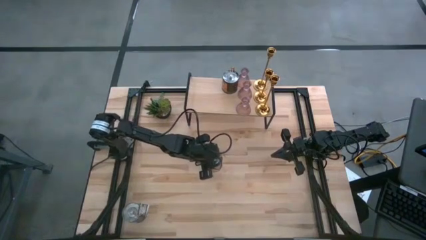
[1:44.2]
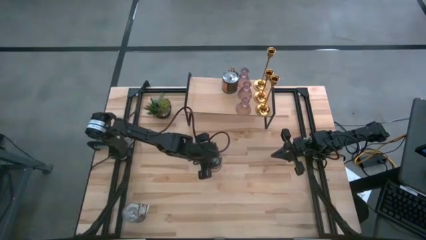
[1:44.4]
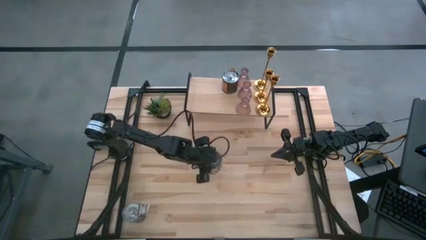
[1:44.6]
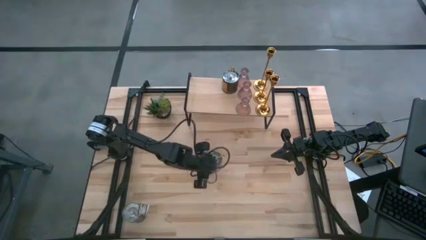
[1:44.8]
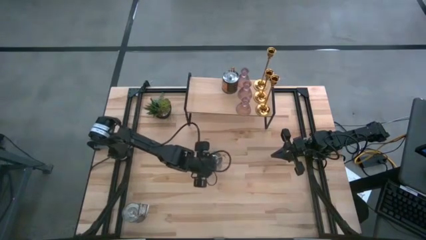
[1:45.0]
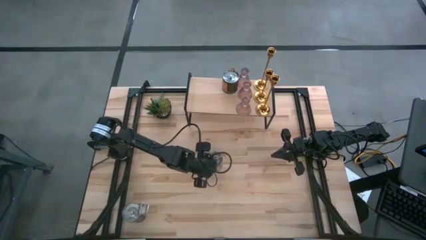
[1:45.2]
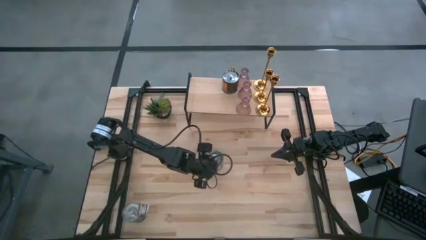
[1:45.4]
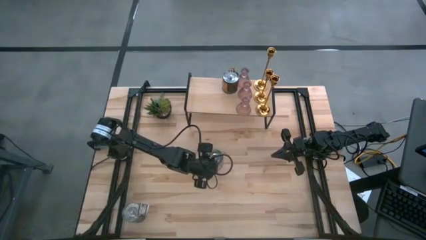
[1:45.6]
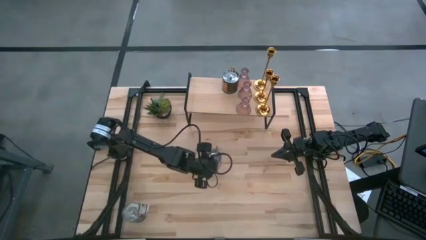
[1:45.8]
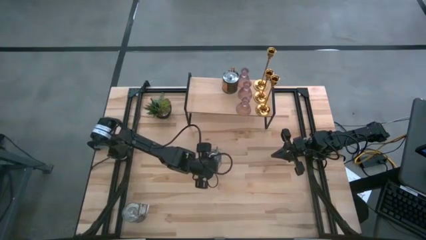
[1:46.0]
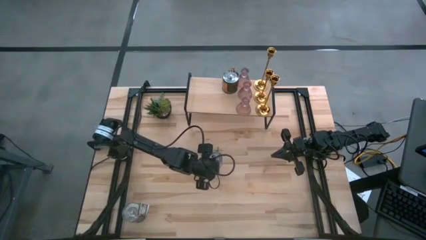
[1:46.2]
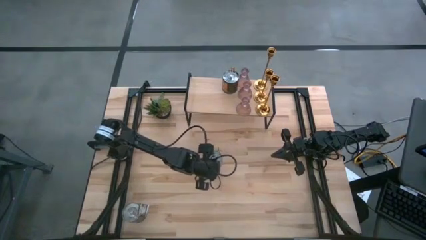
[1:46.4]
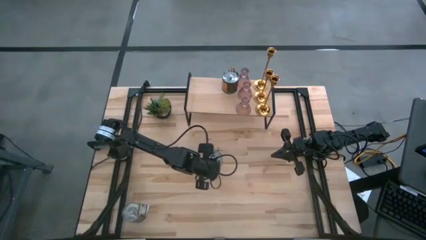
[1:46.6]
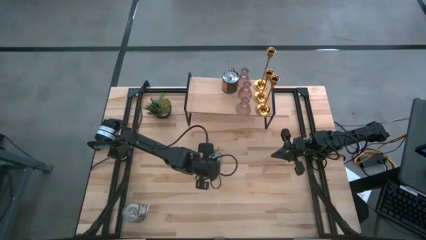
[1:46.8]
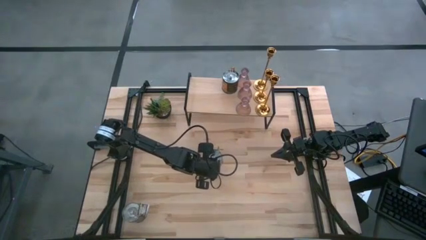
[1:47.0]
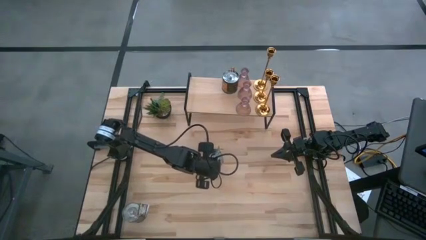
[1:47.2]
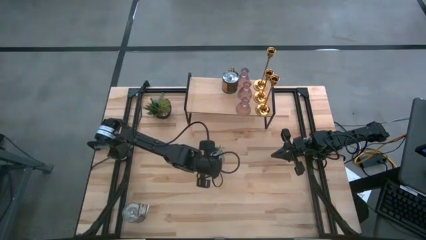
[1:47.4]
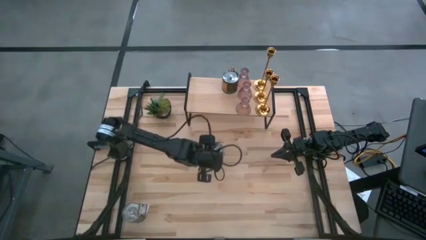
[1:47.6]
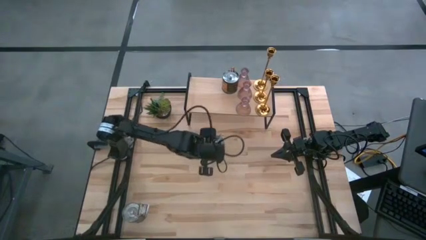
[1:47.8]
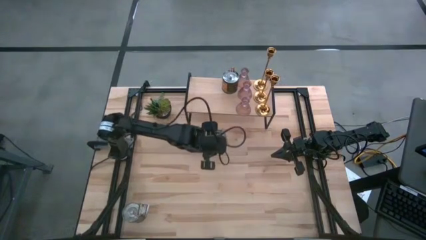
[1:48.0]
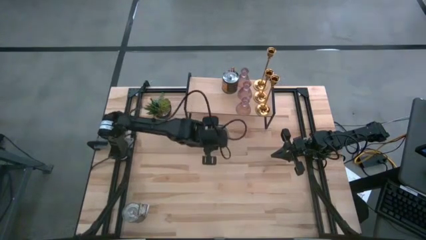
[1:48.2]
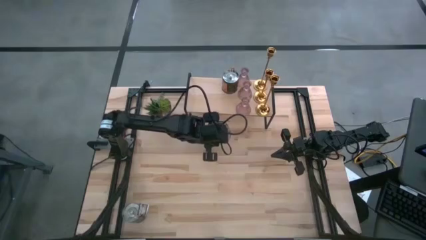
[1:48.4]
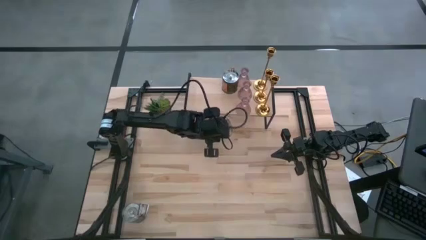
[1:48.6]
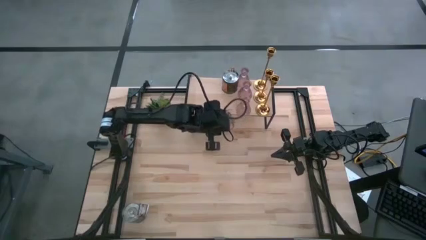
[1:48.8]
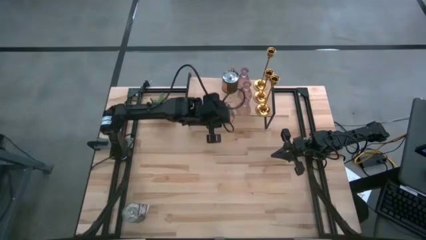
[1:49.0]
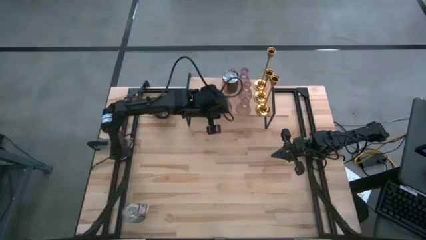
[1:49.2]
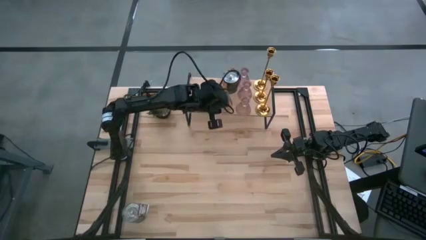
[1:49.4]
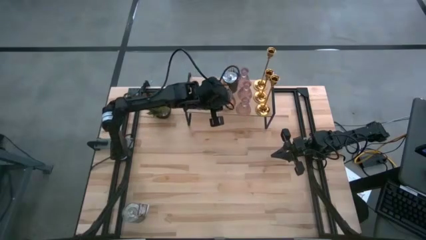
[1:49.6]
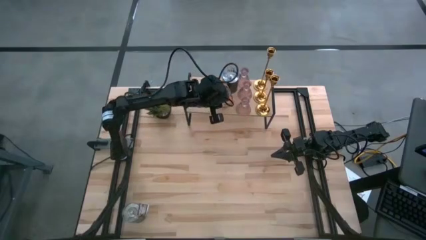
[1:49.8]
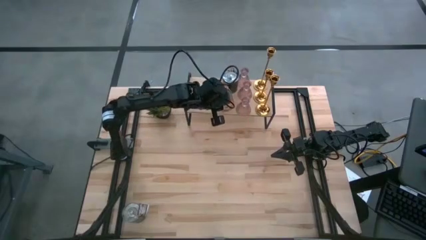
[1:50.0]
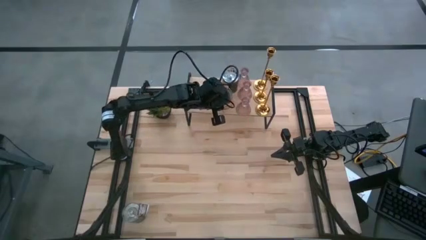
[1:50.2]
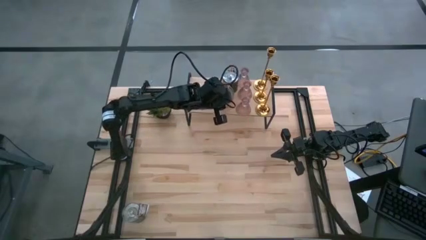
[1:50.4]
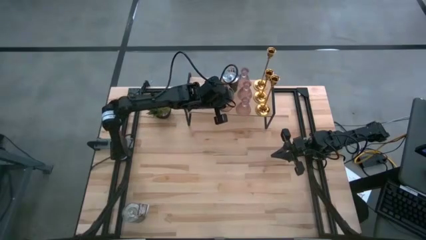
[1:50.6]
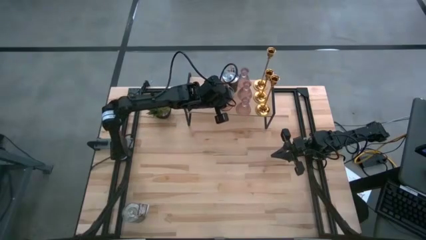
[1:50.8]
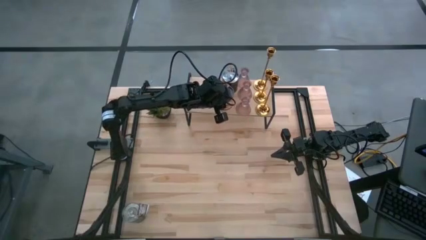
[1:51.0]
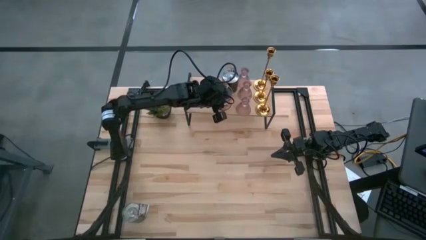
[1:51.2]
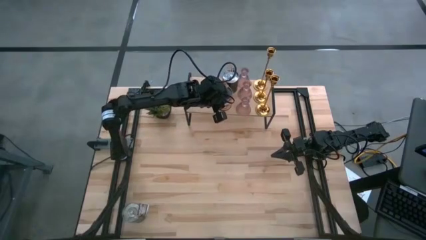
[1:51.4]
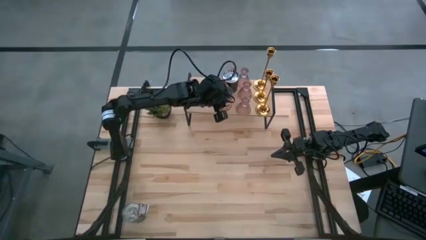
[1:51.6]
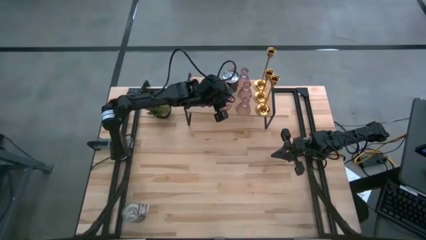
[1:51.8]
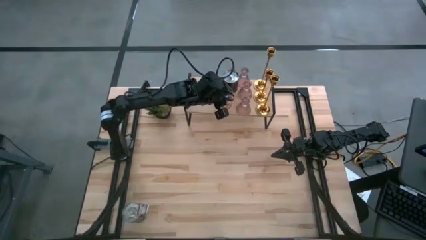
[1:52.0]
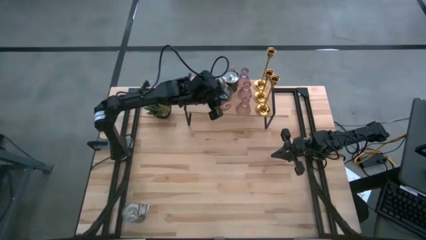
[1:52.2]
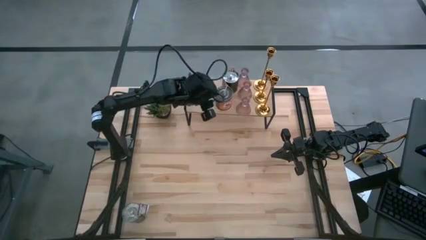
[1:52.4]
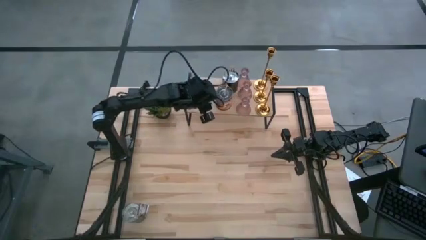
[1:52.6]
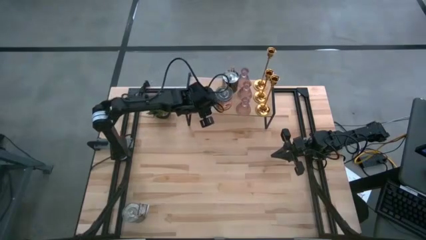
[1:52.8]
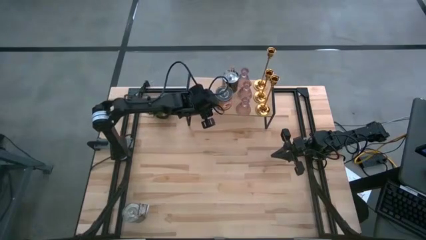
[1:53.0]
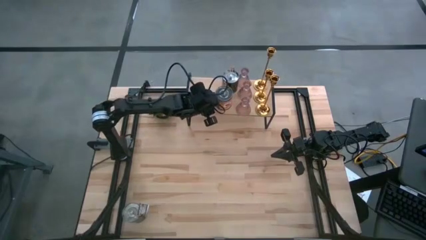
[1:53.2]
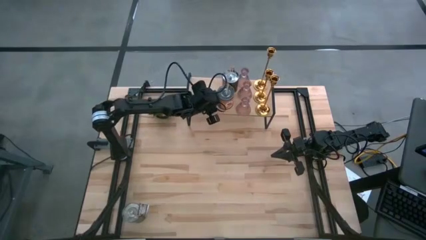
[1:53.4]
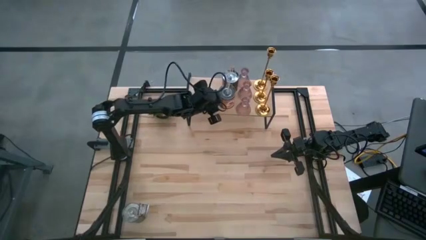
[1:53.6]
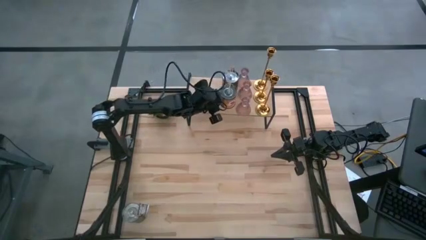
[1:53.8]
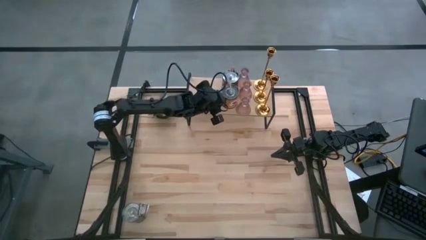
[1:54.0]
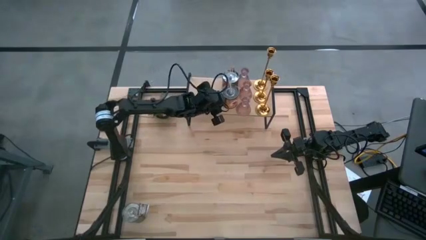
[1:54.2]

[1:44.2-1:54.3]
Task: Pick & Place candle stick holders
Align the right silver scented candle on the shelf with the silver scented candle

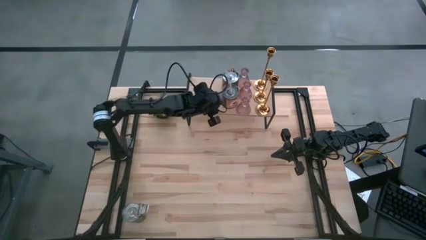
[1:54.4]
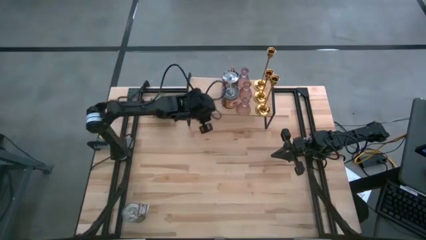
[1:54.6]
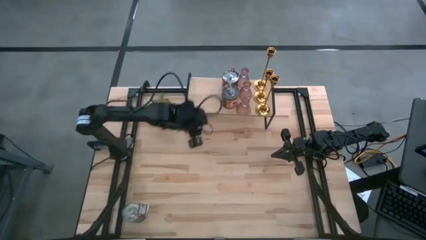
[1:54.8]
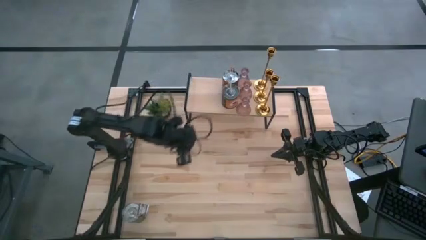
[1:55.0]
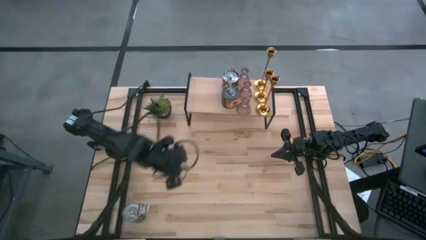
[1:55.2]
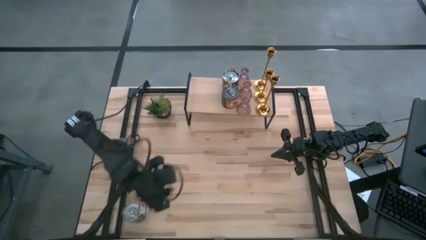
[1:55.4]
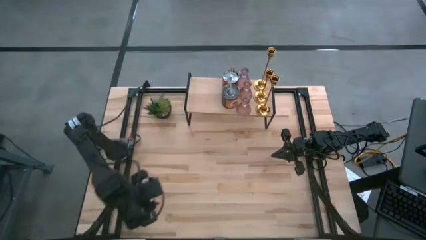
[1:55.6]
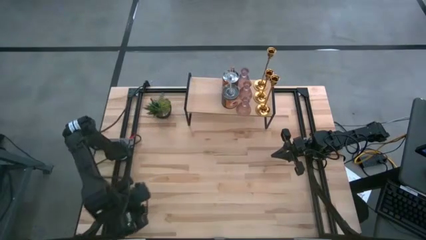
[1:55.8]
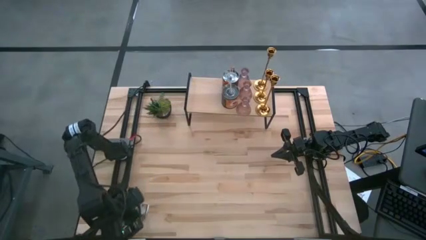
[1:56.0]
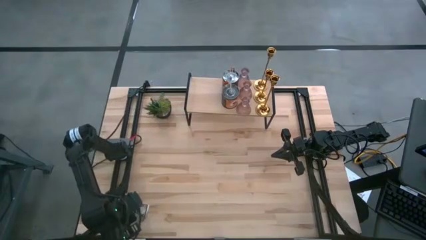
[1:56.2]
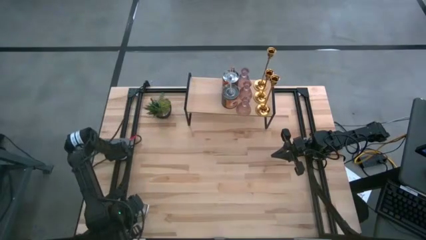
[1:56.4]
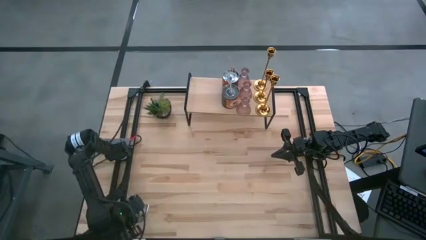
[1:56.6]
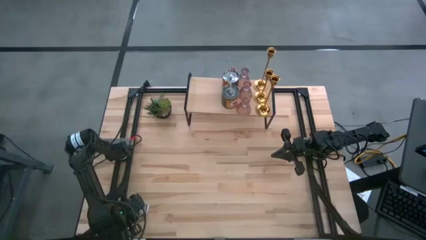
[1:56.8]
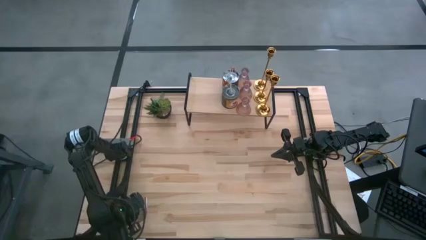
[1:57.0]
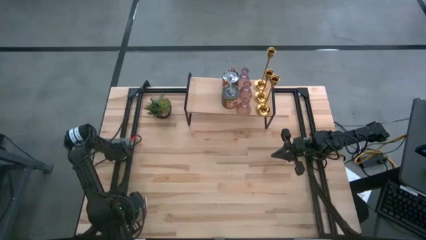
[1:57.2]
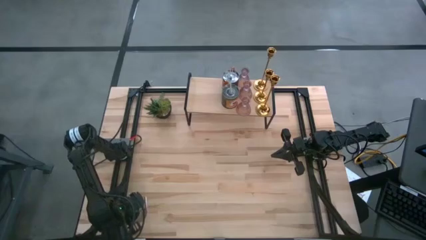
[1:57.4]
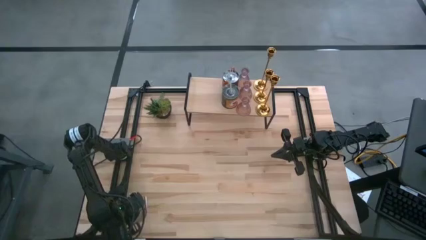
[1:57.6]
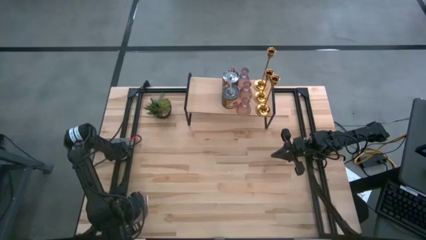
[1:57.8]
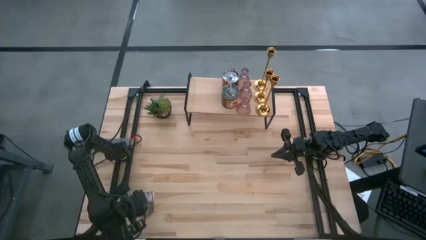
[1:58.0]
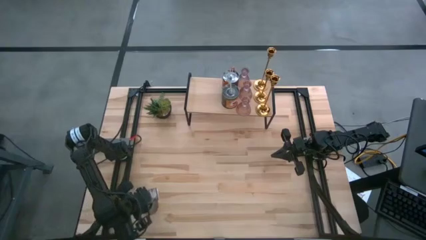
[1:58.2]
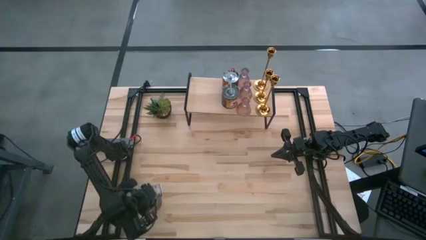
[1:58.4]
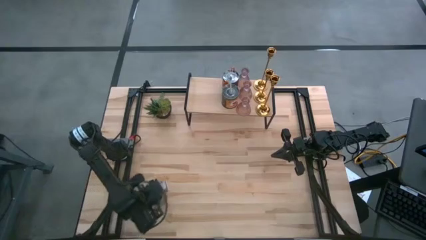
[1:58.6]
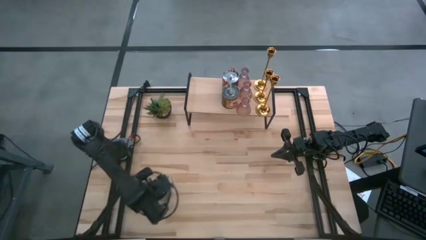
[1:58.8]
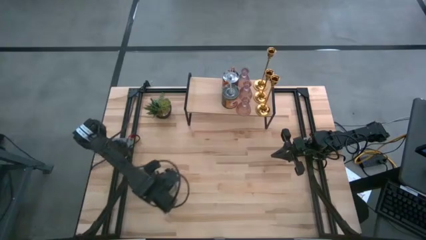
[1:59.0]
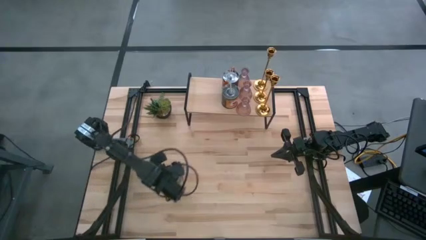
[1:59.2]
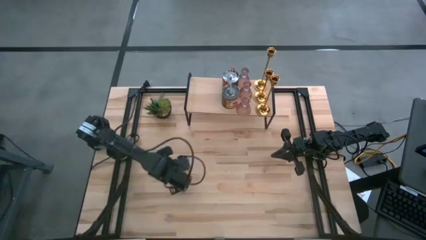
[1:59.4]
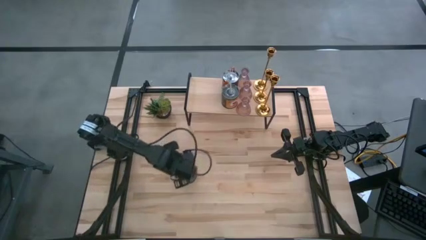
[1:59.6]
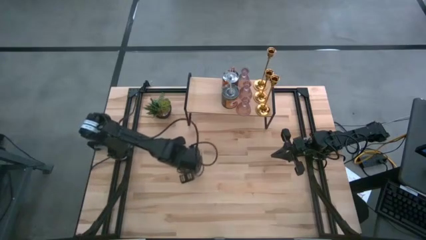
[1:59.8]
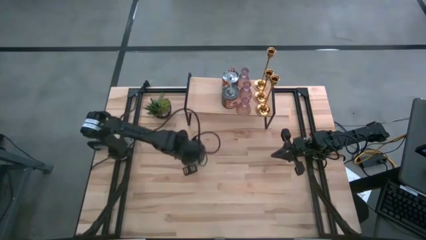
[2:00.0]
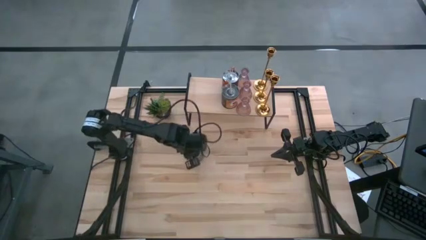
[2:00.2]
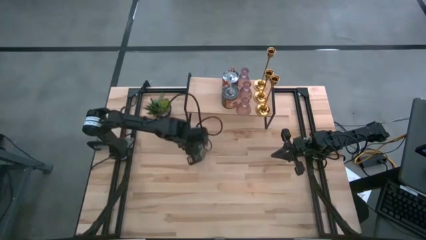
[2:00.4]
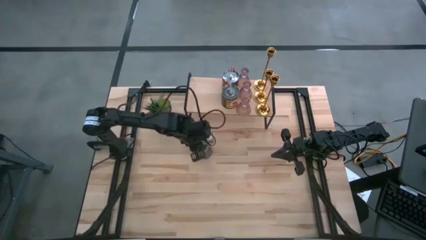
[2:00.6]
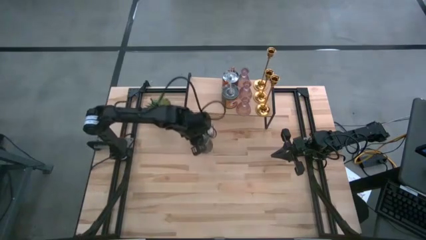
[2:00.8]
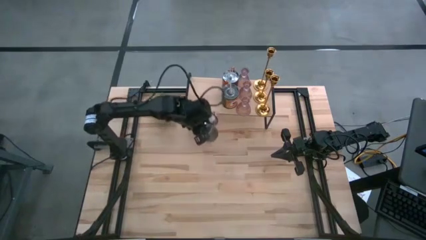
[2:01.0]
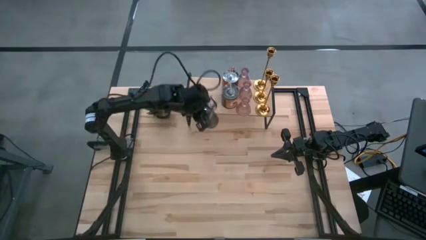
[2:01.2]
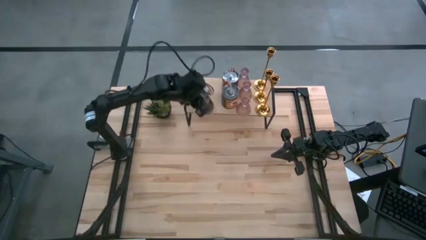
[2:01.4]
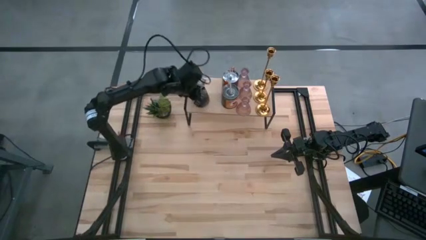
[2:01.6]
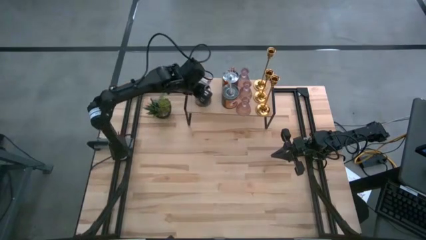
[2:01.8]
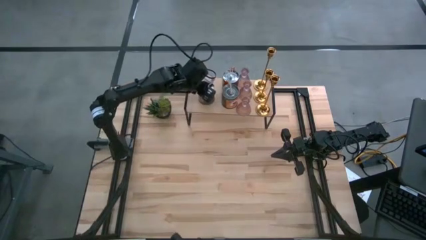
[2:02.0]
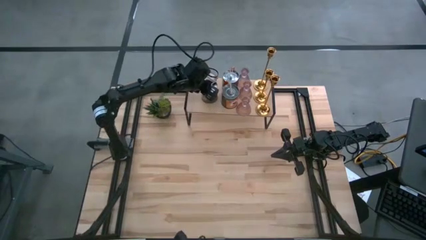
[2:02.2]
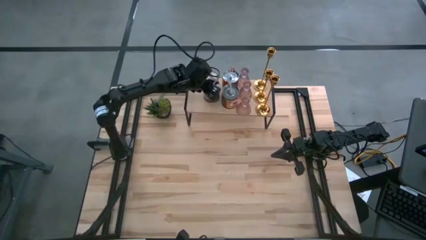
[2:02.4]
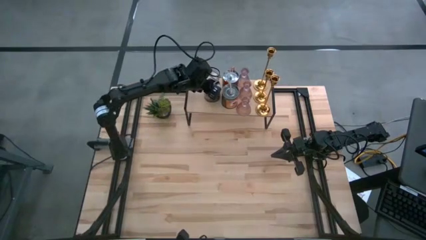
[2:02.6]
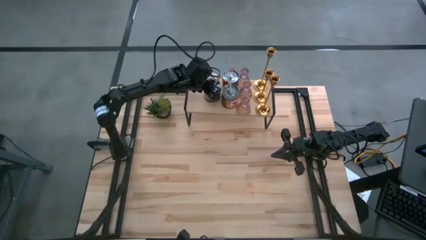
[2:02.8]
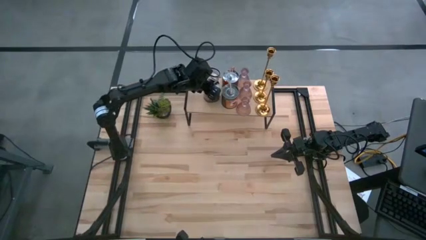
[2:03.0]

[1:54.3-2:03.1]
Put the silver scented candle on the shelf
